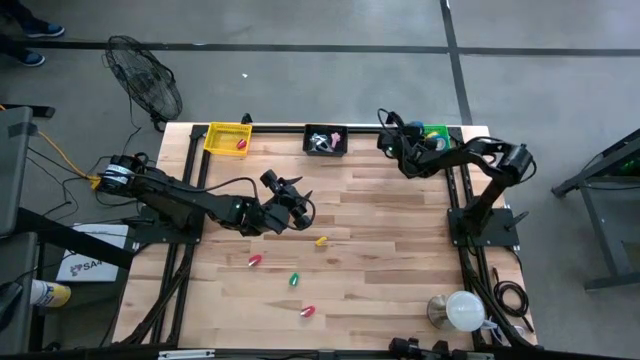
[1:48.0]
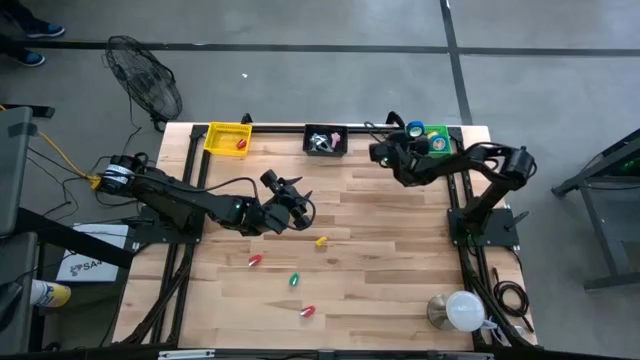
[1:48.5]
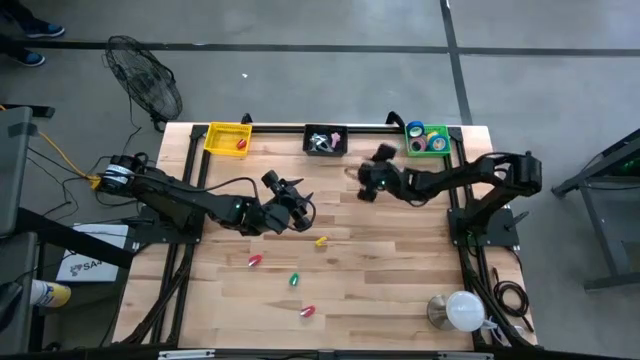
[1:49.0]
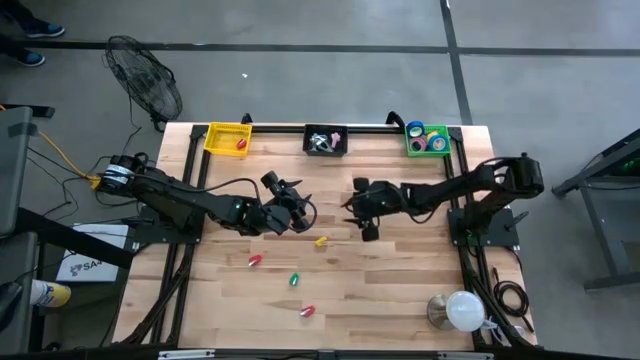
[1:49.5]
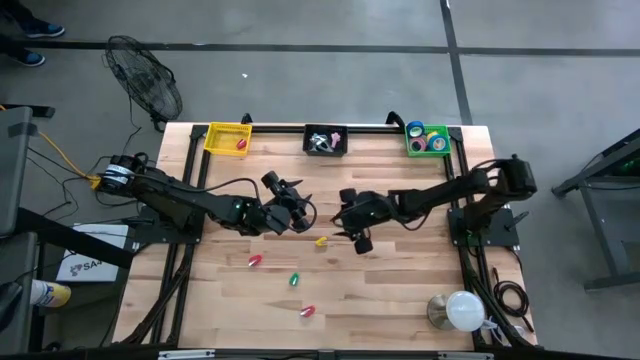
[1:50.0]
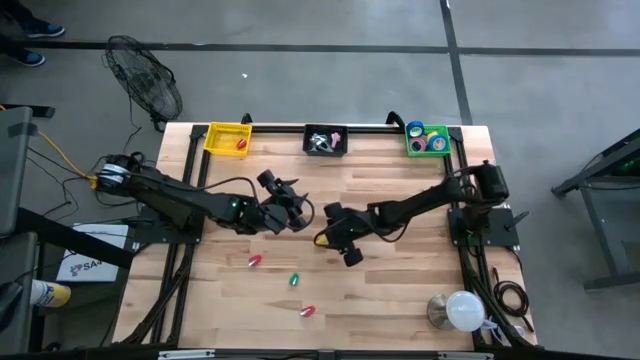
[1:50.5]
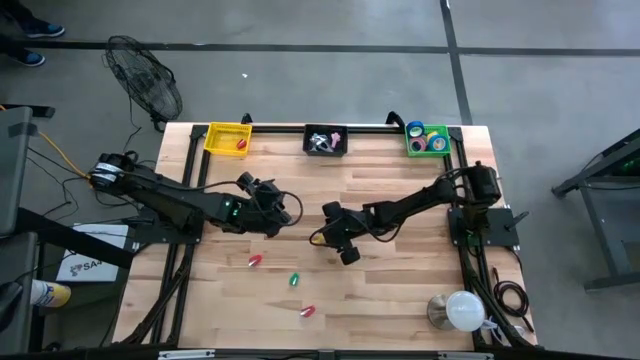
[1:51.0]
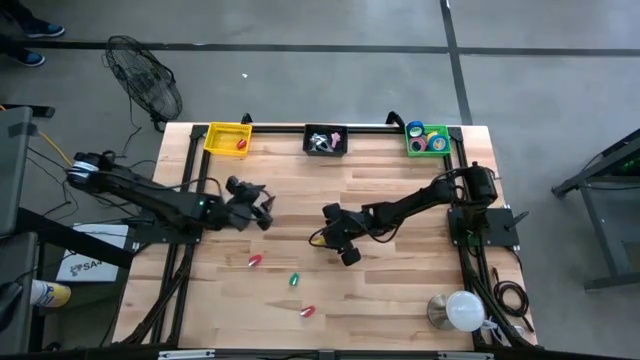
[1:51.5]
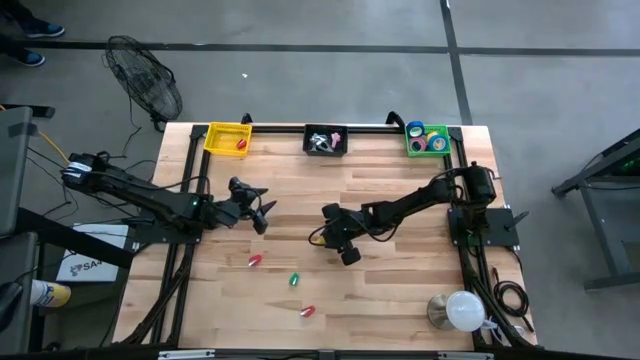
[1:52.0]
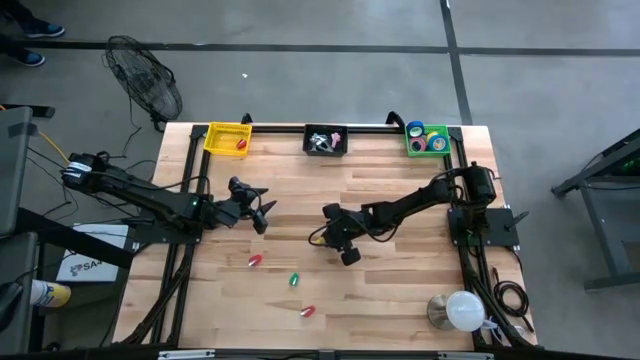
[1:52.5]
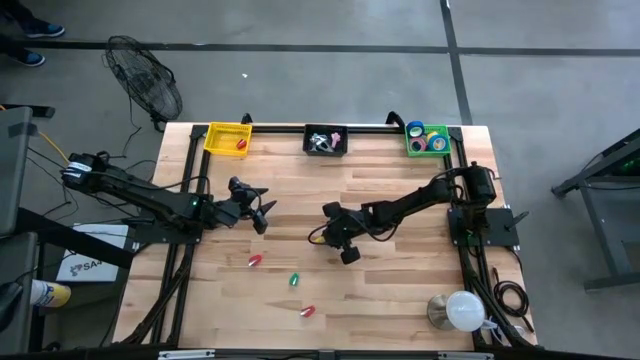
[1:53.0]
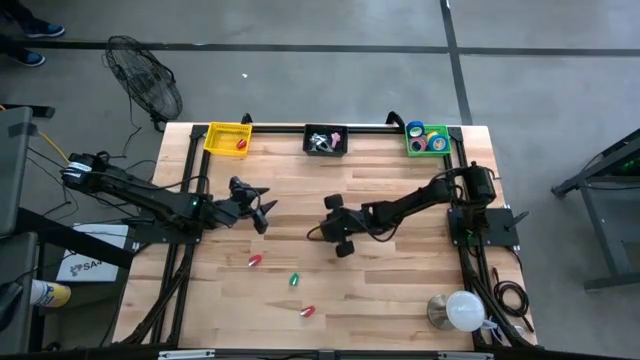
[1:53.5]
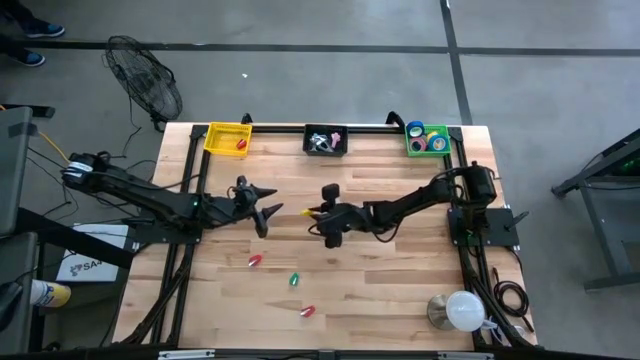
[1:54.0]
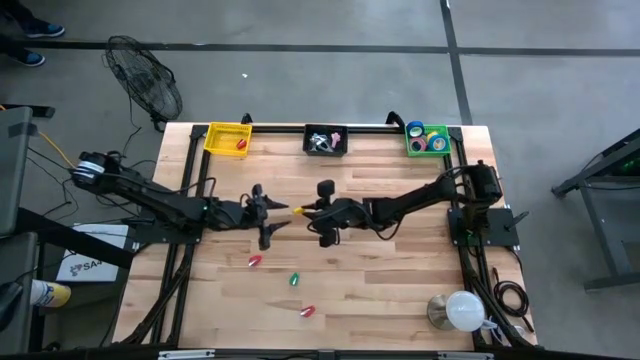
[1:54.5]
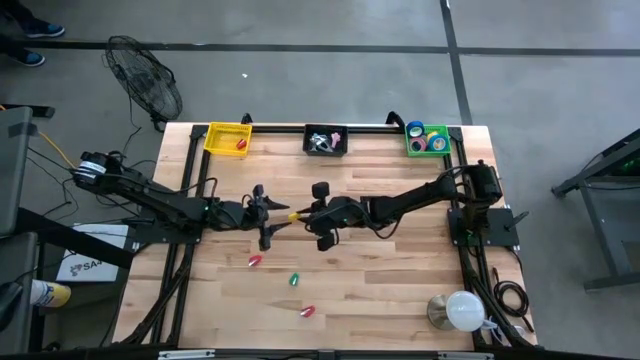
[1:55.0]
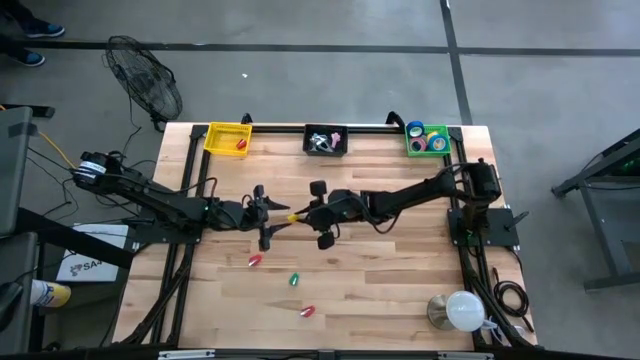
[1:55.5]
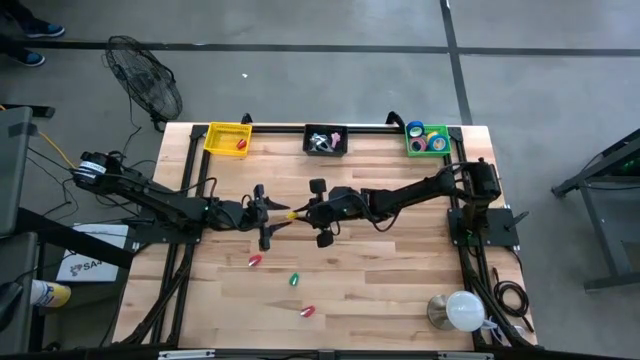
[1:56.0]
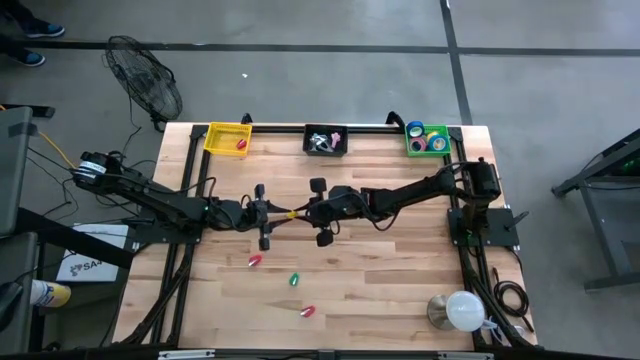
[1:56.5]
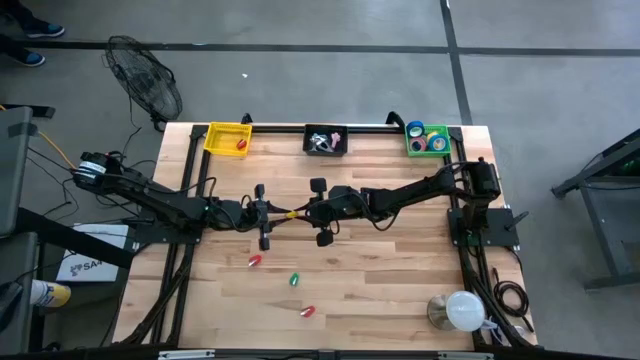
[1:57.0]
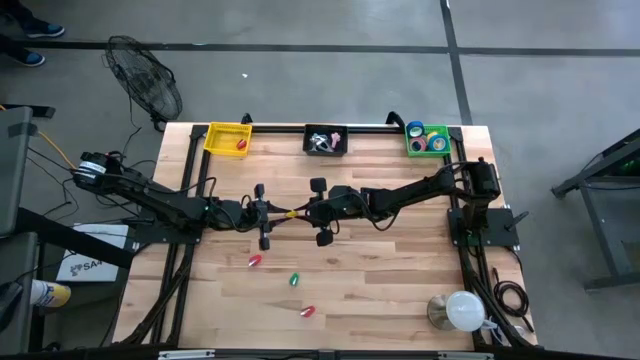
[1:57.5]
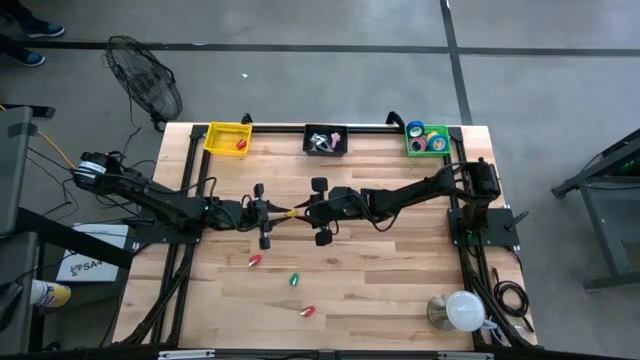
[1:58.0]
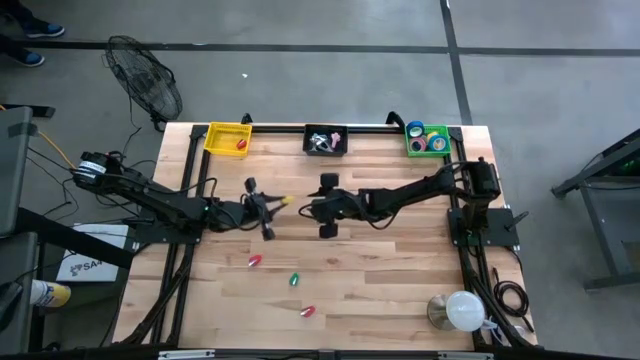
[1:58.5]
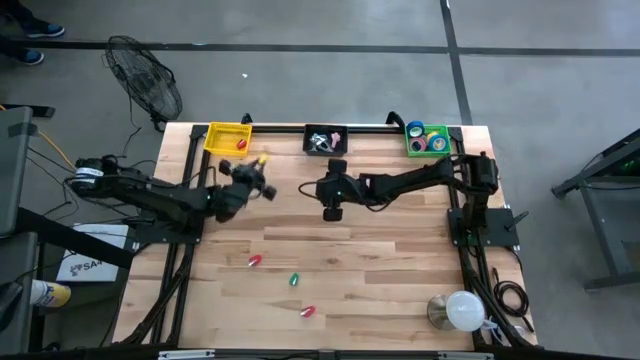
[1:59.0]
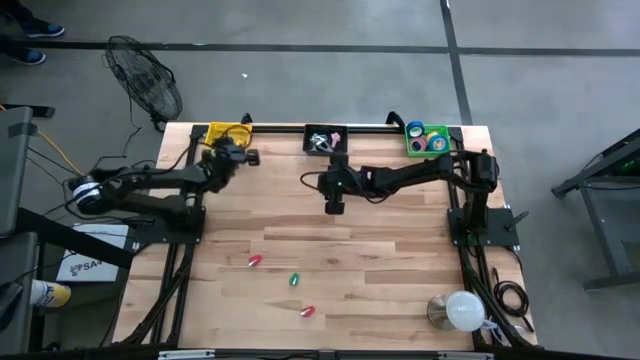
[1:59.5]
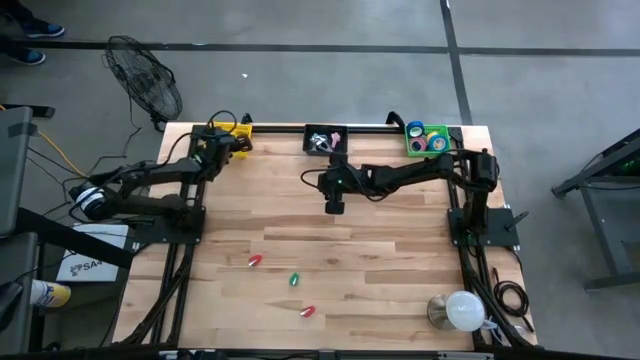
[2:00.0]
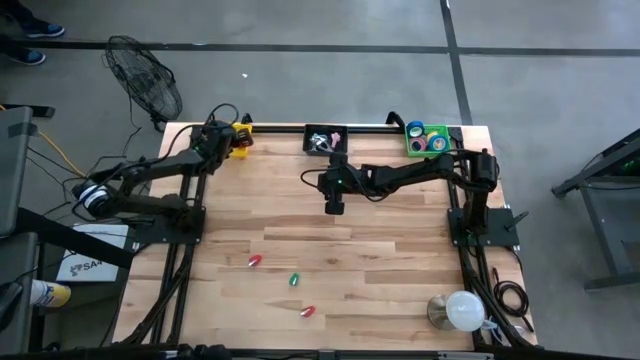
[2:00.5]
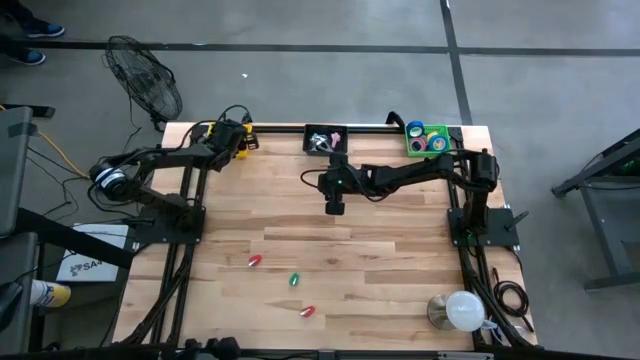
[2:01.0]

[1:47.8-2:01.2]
Task: Pick and place Stapler, Stapler remover, tape
Put the yellow stapler into the yellow bin

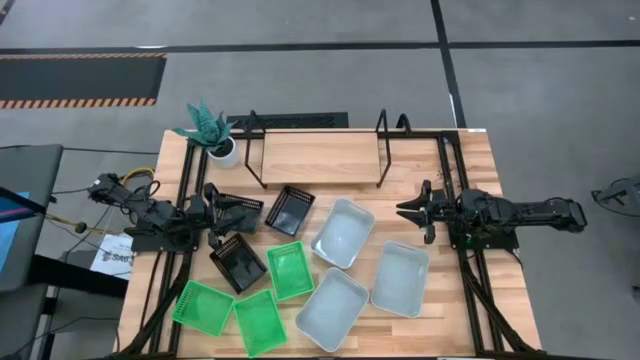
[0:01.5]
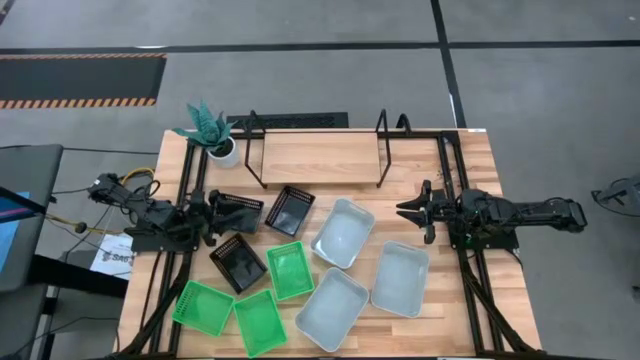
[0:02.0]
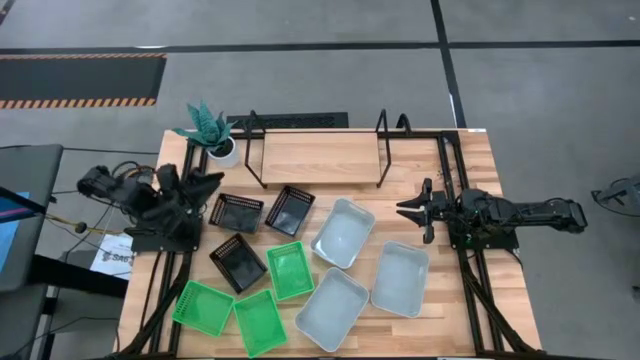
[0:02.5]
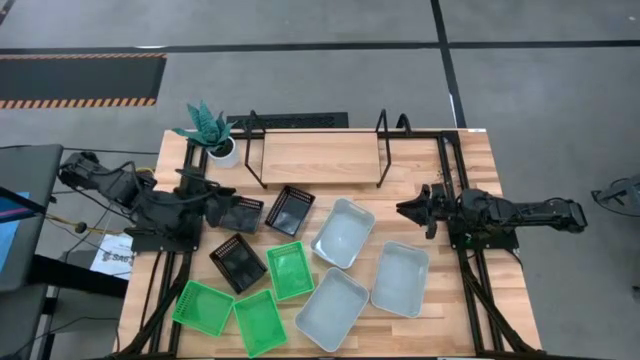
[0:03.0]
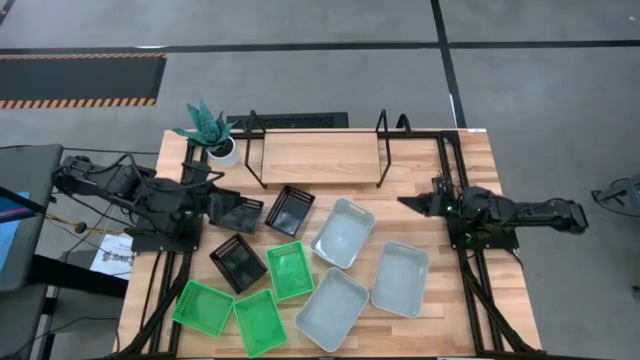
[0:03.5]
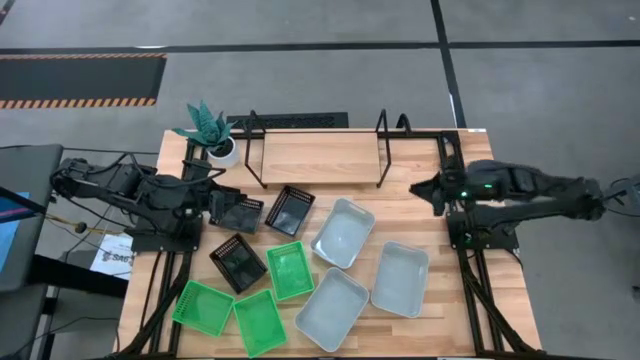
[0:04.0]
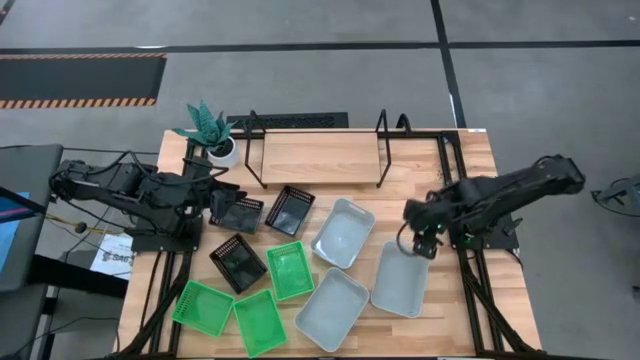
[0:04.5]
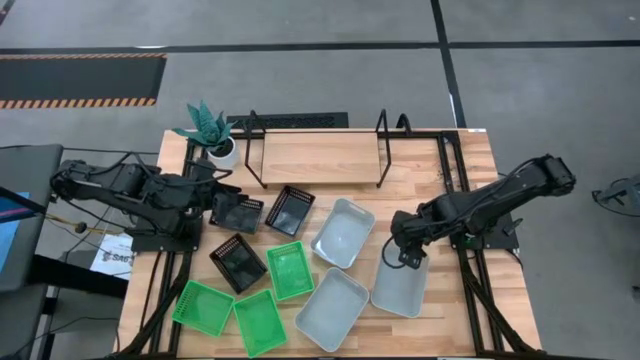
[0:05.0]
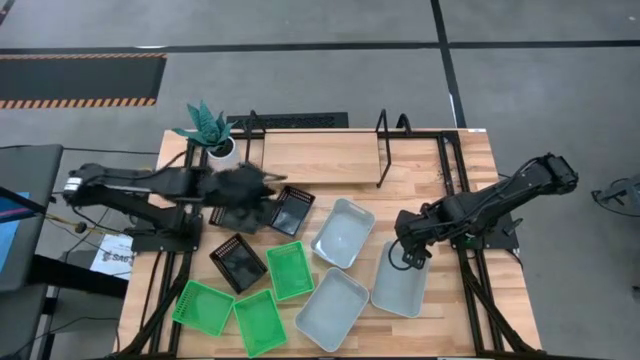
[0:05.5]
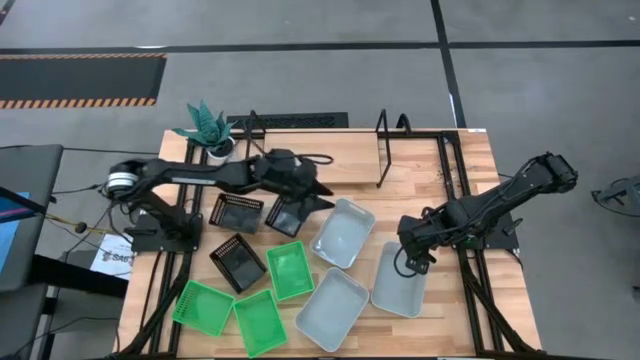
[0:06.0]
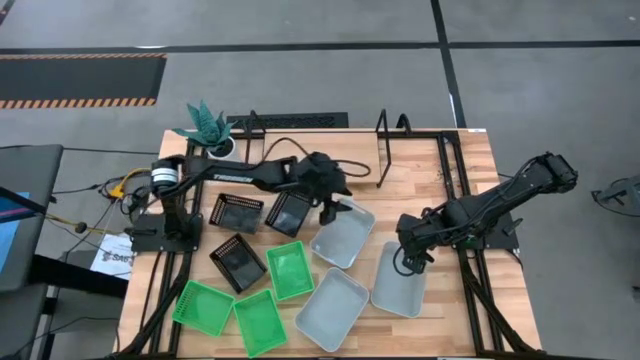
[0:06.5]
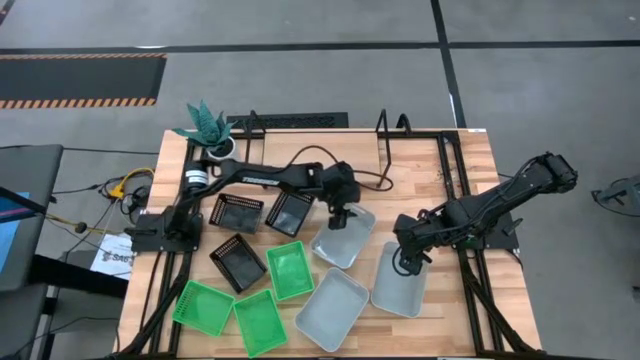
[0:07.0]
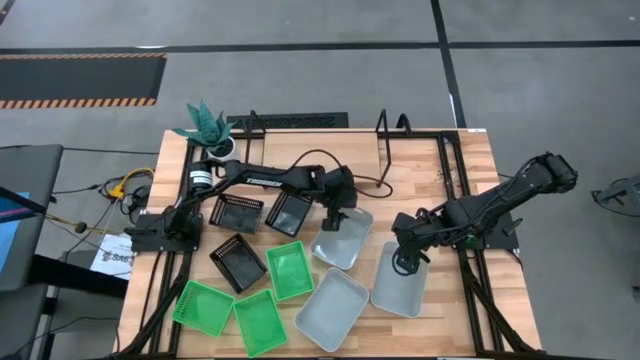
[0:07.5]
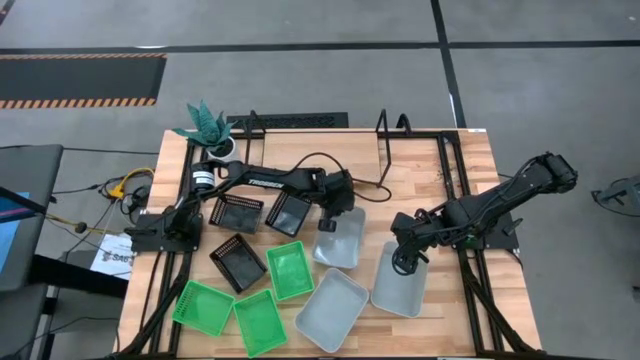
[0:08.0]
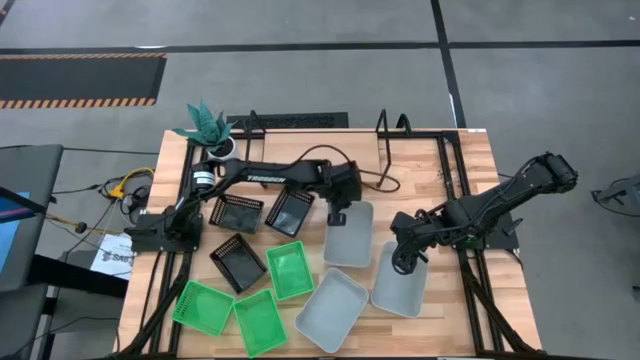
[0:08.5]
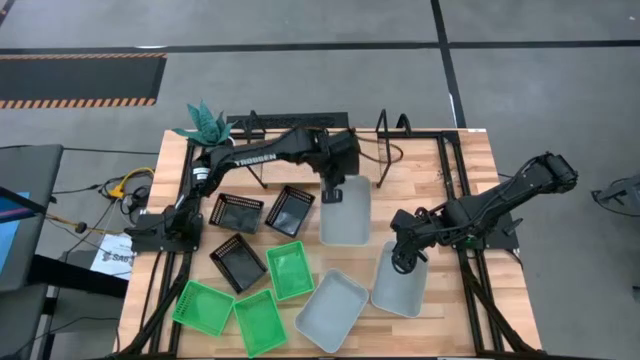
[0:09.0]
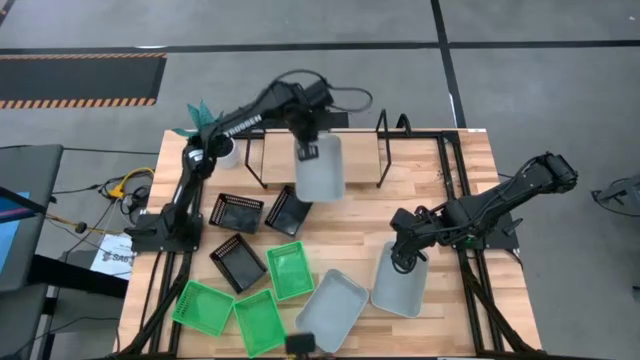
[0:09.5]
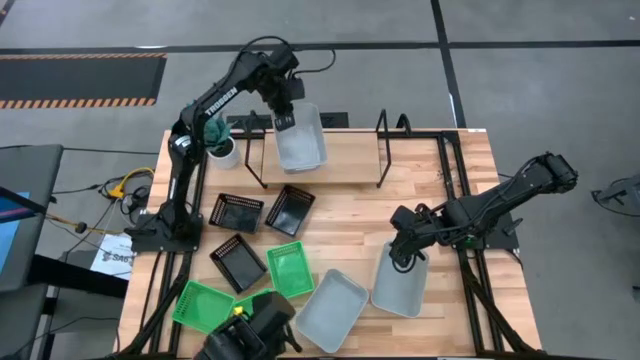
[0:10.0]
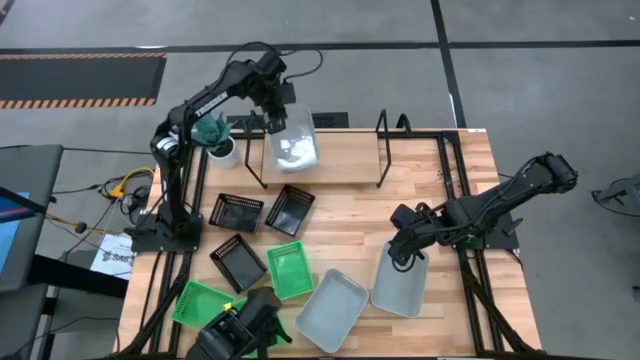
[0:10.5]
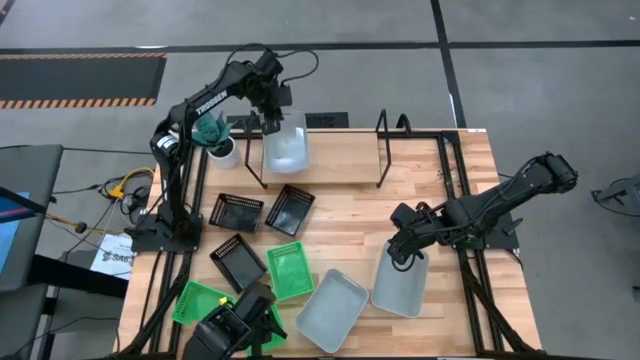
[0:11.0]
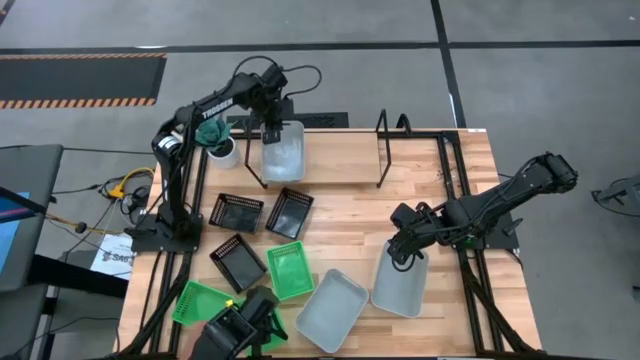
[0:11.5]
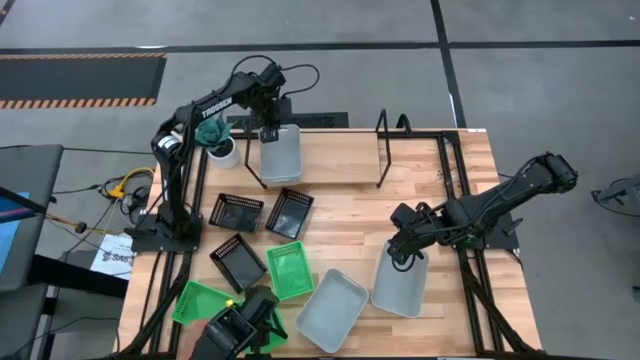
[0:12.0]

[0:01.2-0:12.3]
Task: Stack baskets on shelf by color
Put the top left gray bin on the shelf
